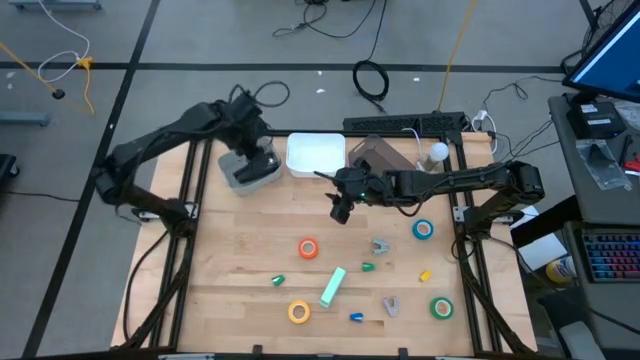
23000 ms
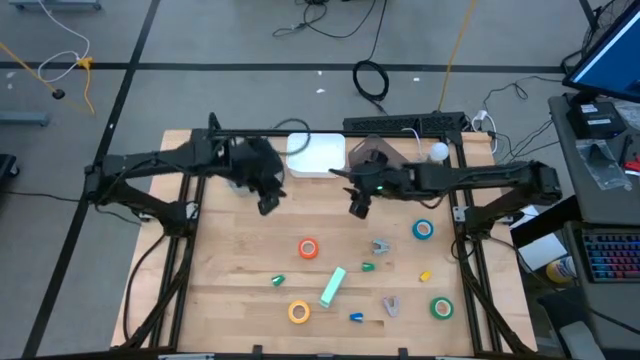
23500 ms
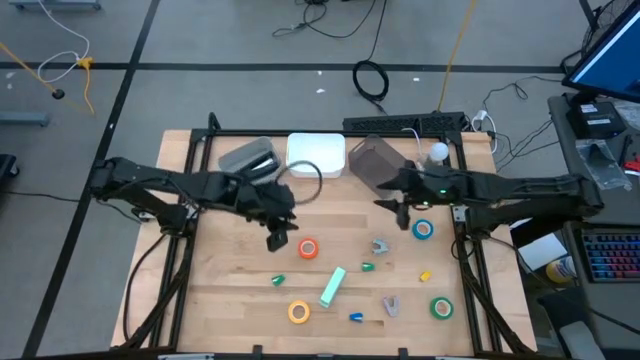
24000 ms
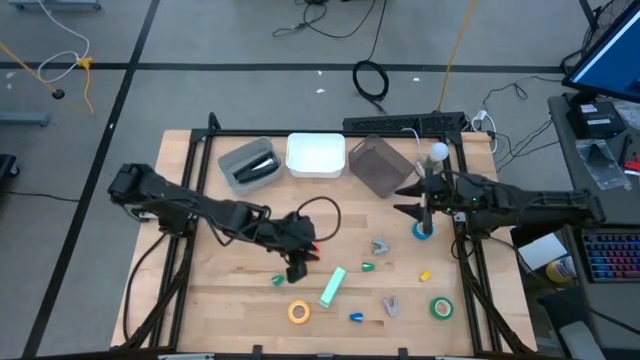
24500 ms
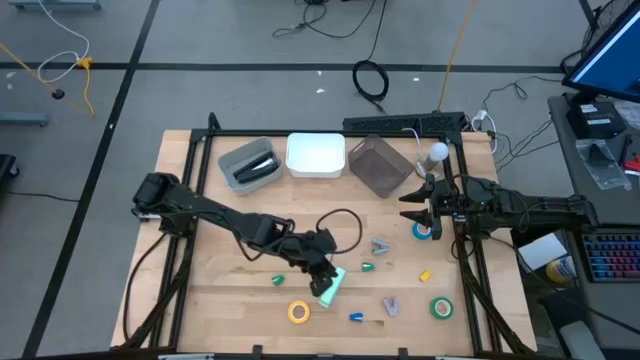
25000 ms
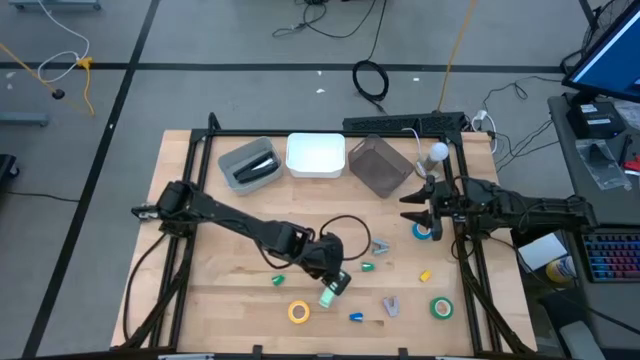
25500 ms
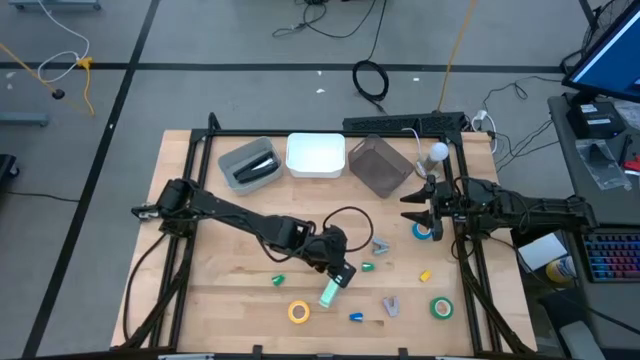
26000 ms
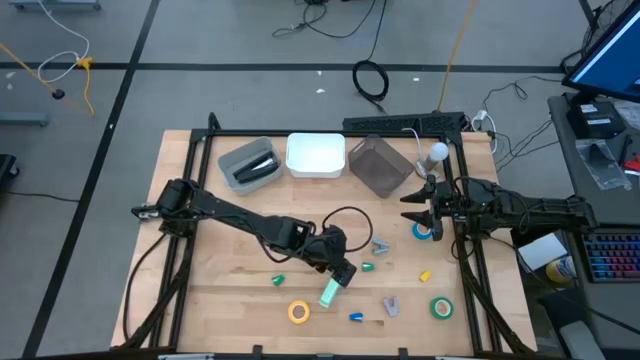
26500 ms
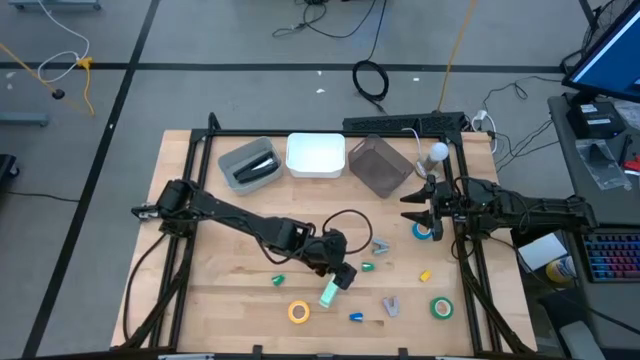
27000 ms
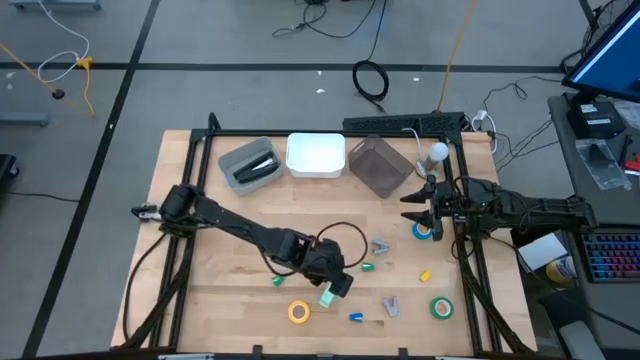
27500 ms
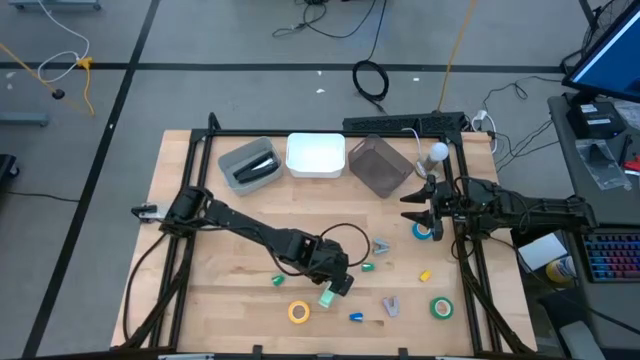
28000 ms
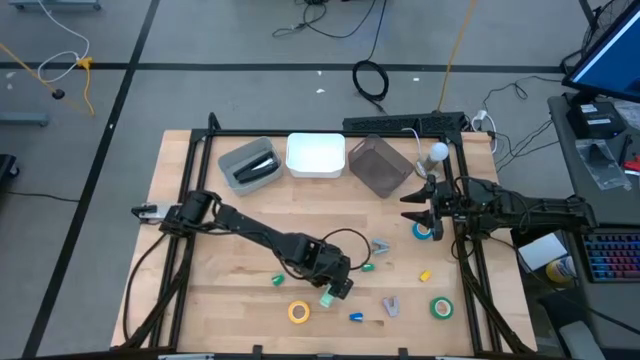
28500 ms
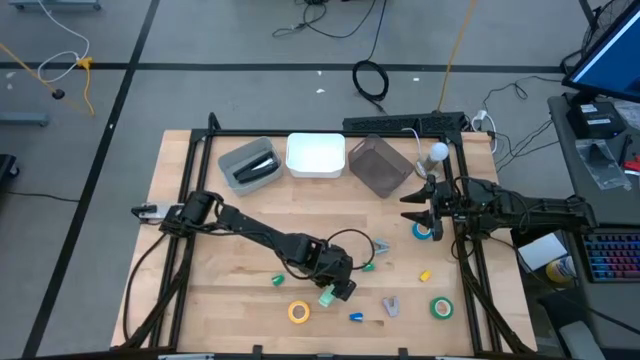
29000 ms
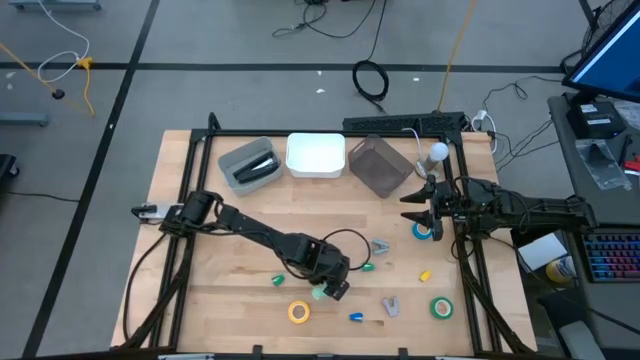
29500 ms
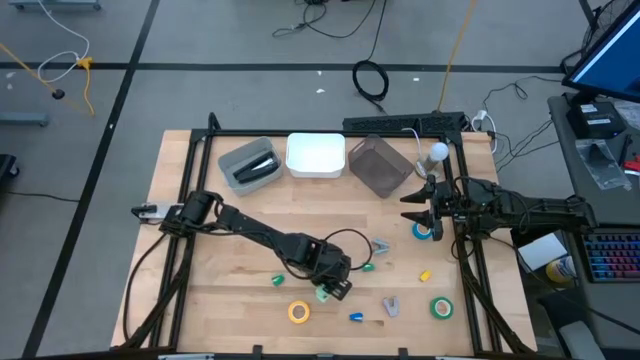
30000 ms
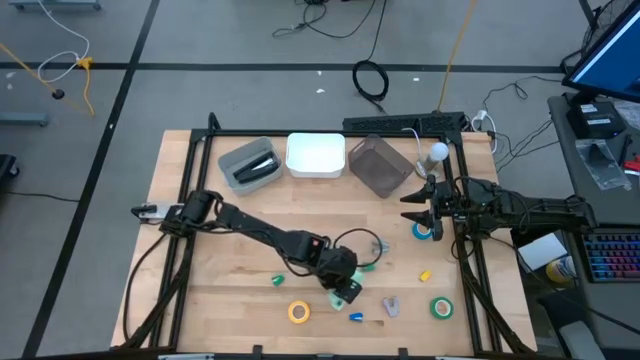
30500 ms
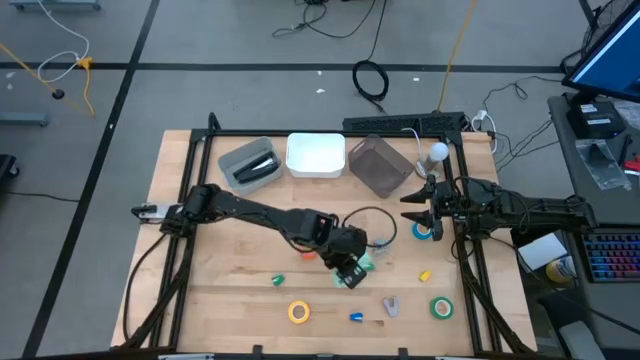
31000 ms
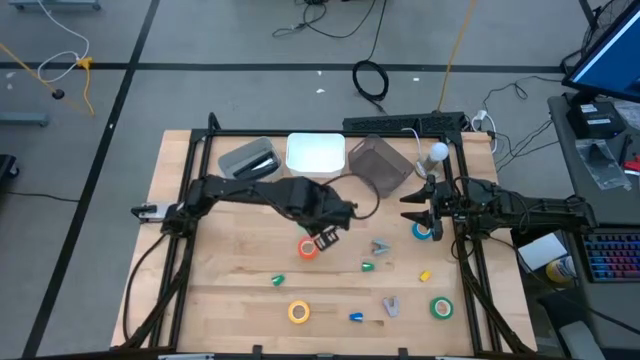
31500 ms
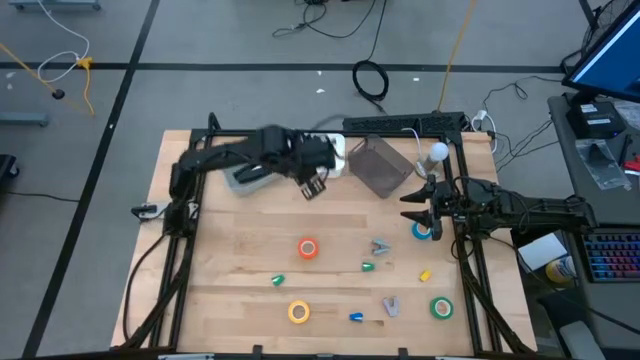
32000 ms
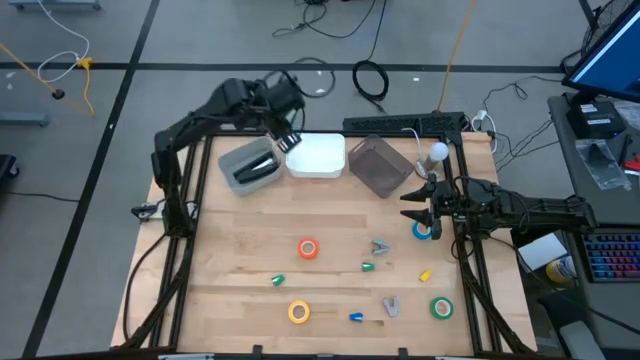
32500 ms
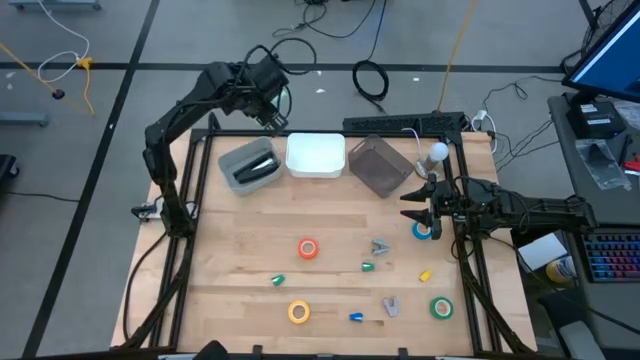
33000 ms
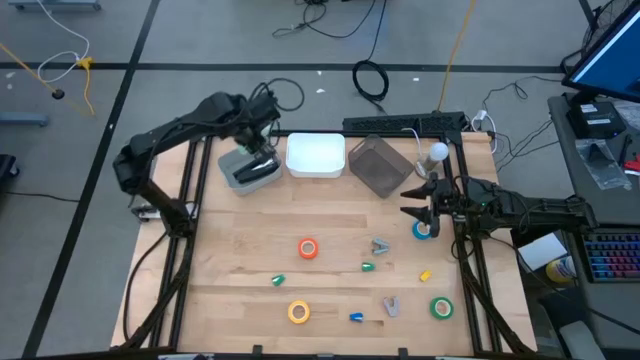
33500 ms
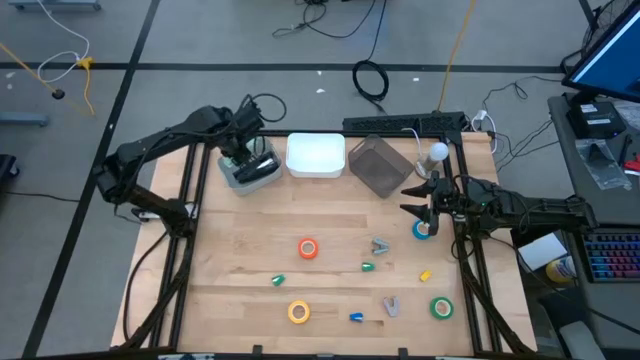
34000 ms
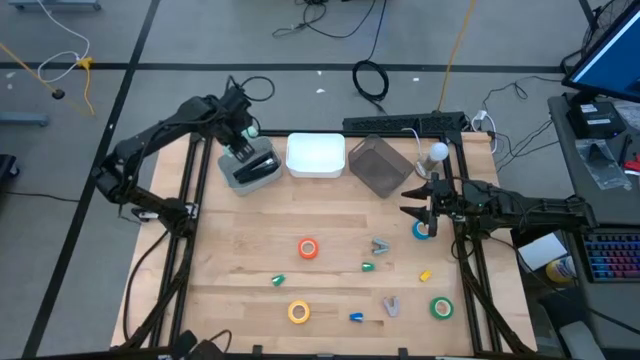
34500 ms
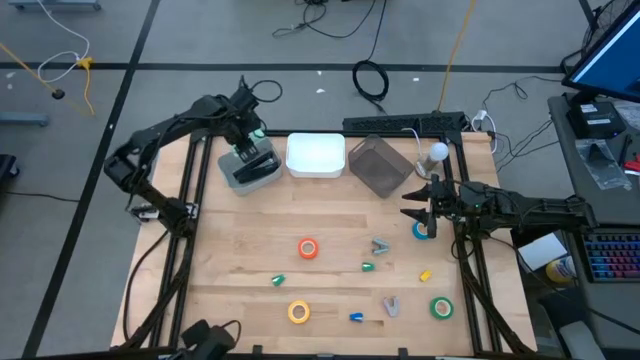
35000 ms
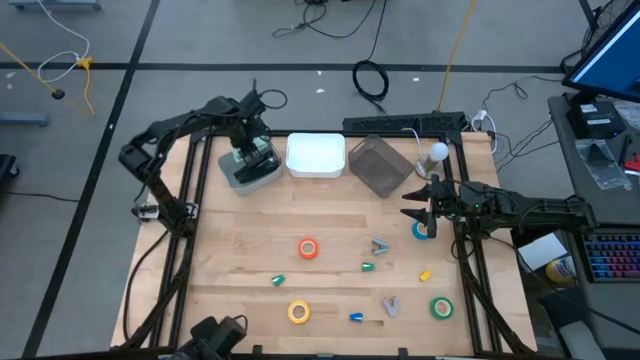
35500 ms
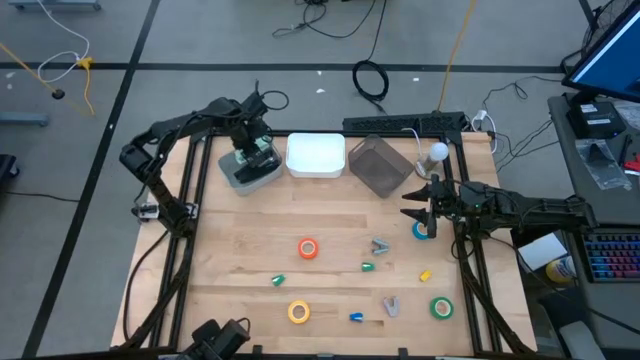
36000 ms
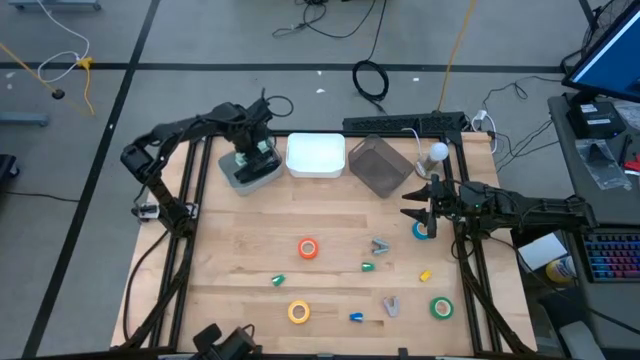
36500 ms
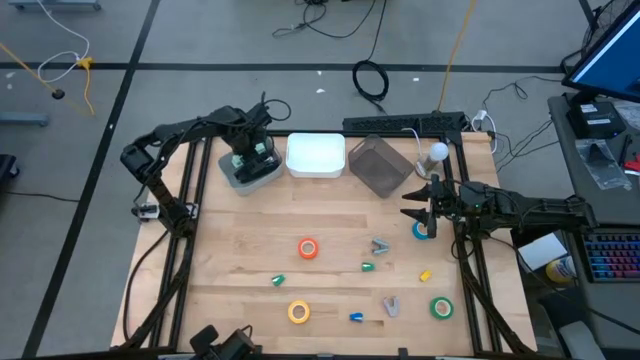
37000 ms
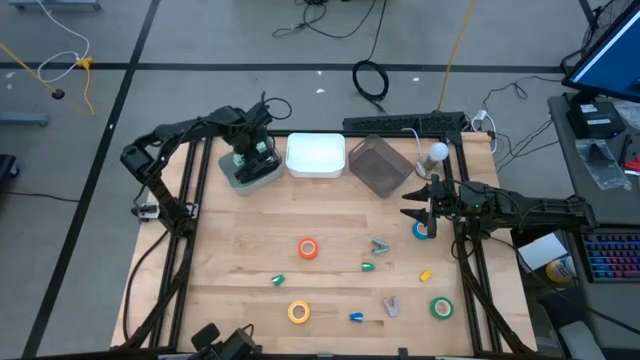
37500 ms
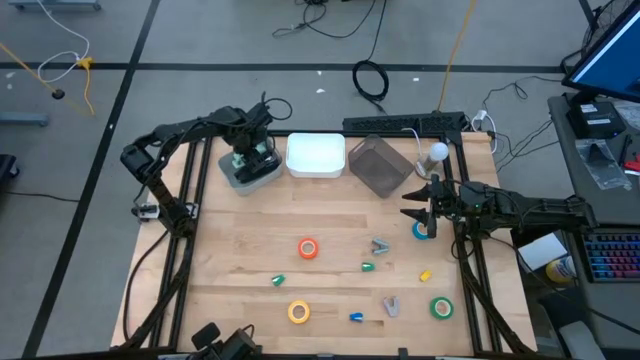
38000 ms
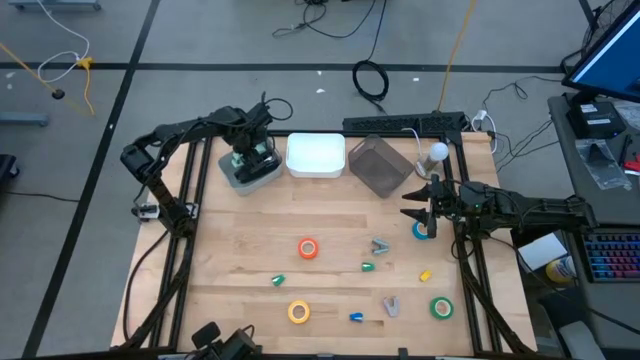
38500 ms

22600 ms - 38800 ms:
Task: Pick and place Stapler, Stapler remover, tape
Put the light green stapler into the gray bin
